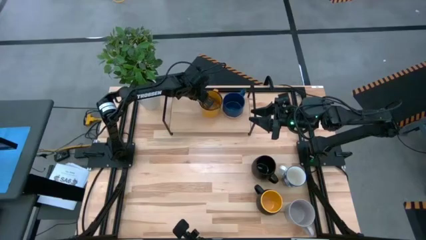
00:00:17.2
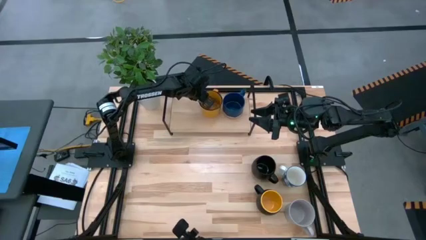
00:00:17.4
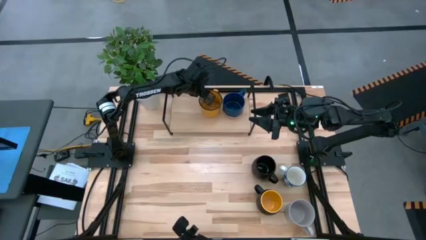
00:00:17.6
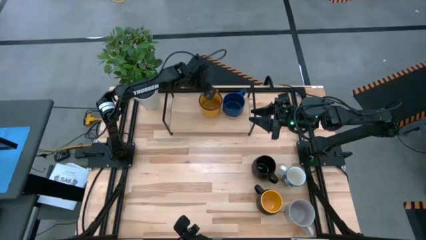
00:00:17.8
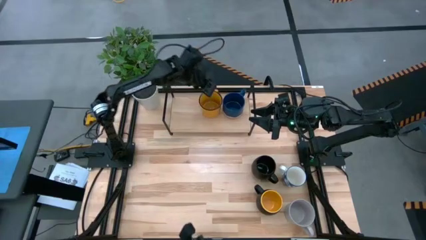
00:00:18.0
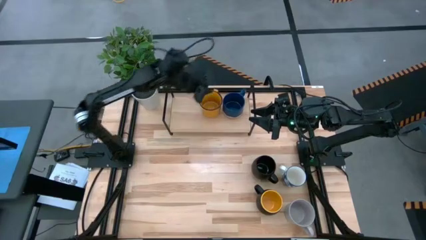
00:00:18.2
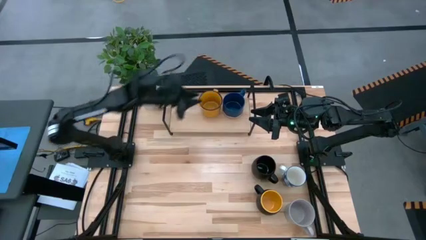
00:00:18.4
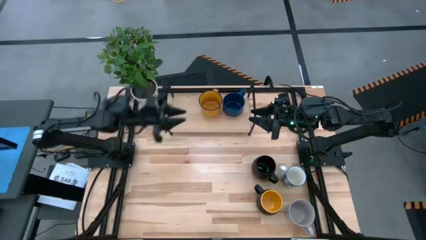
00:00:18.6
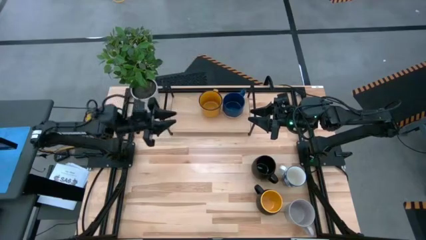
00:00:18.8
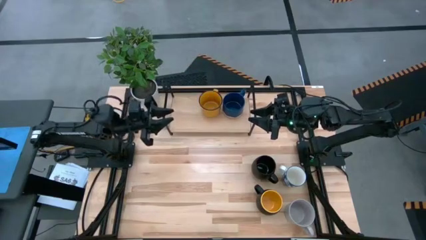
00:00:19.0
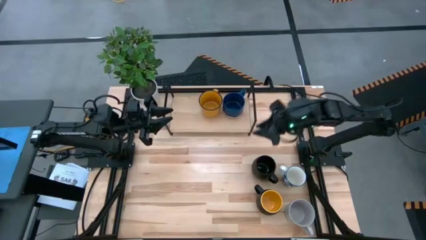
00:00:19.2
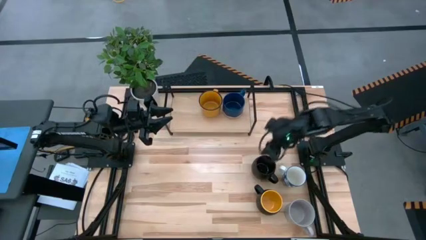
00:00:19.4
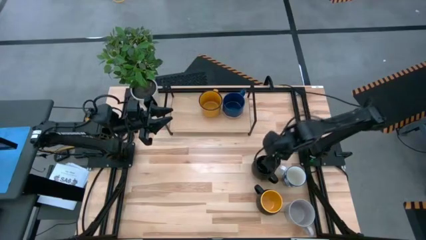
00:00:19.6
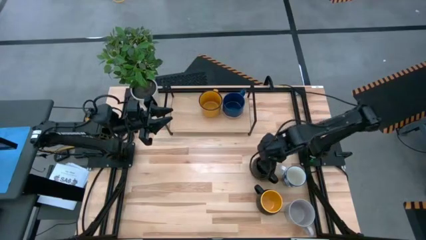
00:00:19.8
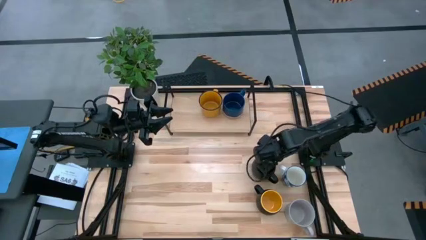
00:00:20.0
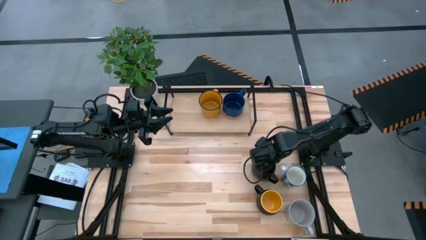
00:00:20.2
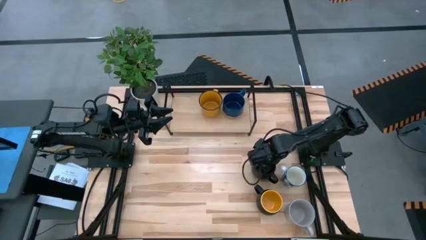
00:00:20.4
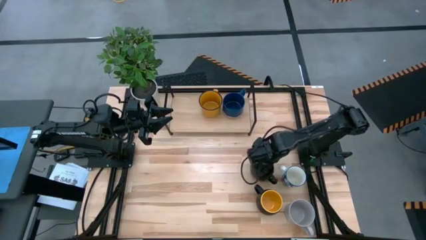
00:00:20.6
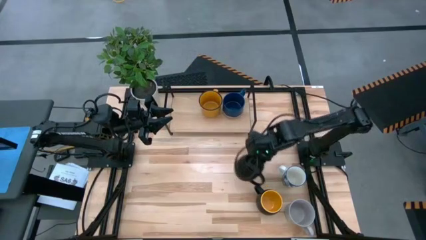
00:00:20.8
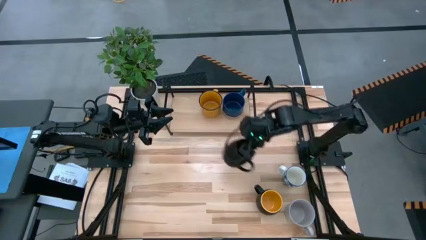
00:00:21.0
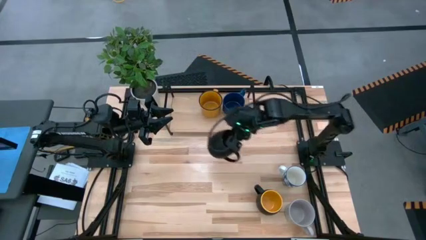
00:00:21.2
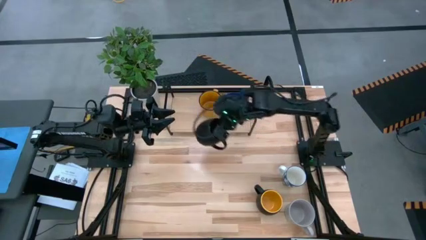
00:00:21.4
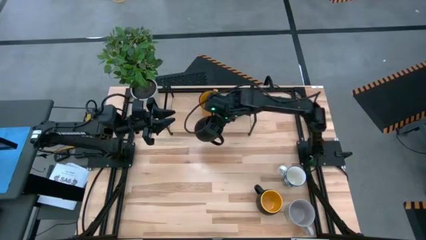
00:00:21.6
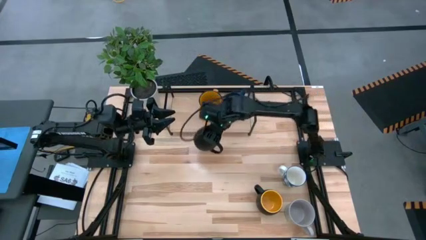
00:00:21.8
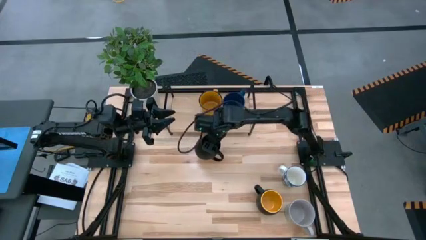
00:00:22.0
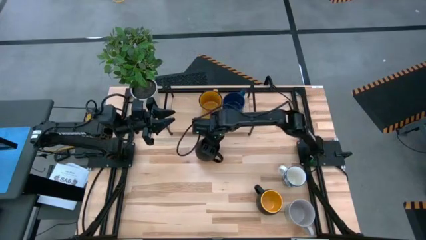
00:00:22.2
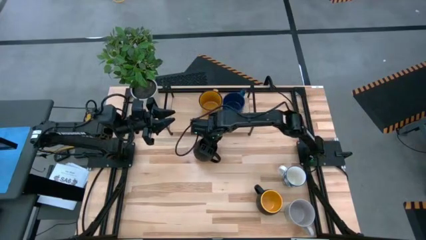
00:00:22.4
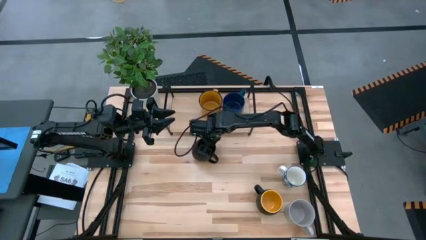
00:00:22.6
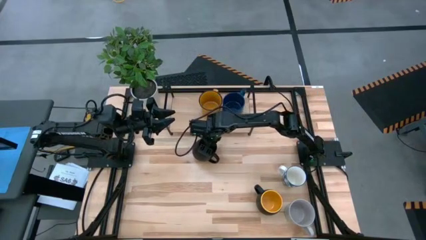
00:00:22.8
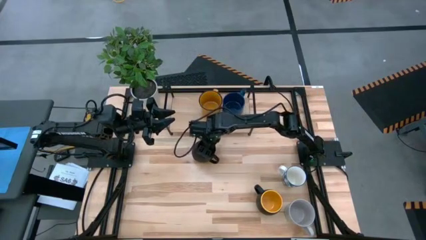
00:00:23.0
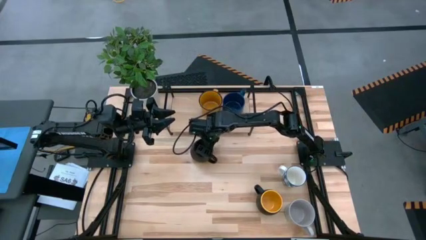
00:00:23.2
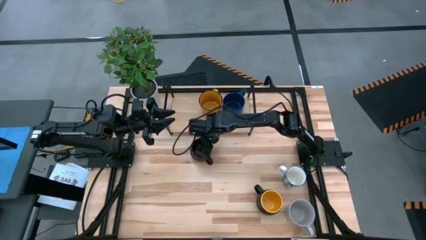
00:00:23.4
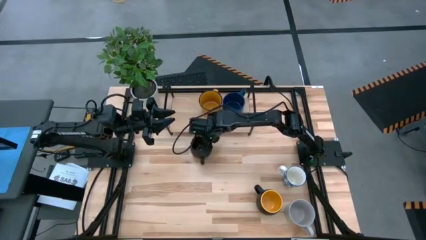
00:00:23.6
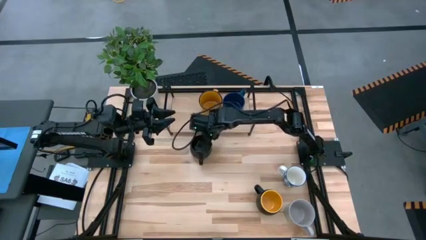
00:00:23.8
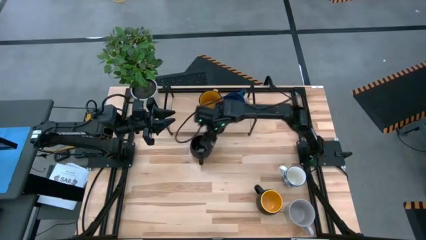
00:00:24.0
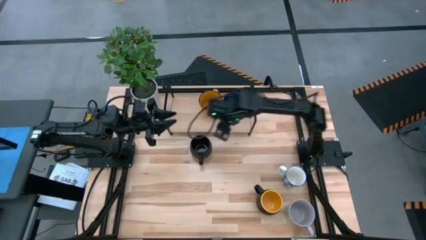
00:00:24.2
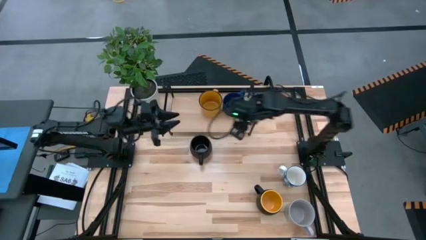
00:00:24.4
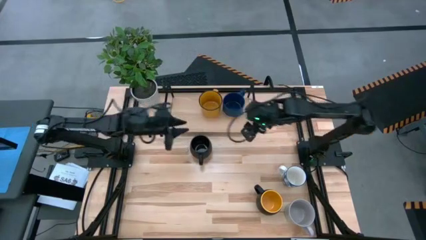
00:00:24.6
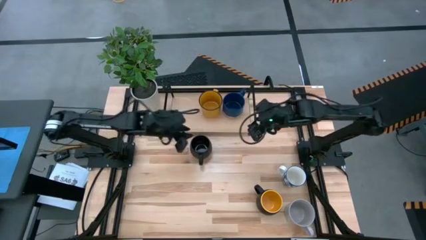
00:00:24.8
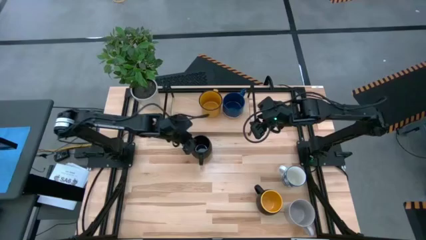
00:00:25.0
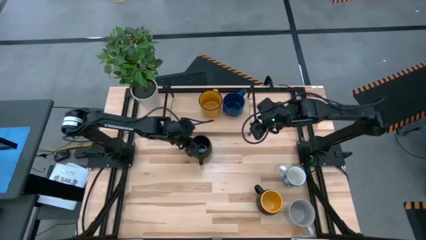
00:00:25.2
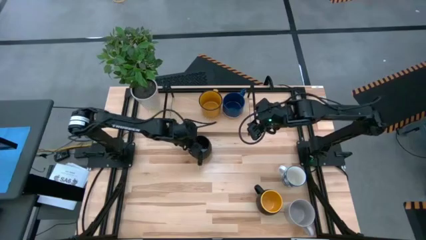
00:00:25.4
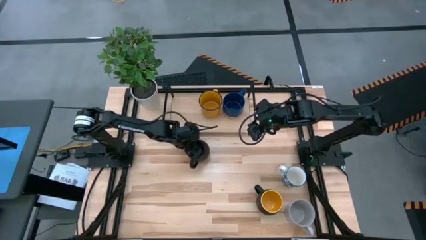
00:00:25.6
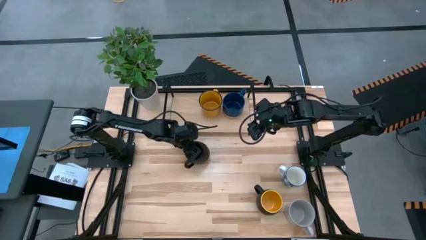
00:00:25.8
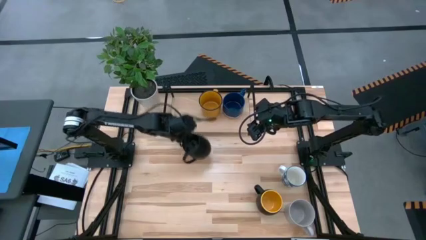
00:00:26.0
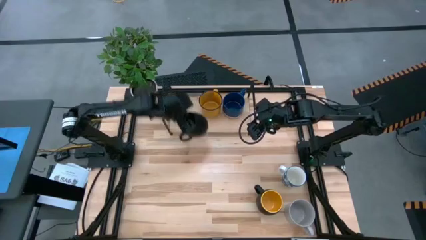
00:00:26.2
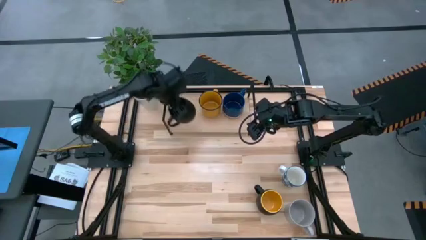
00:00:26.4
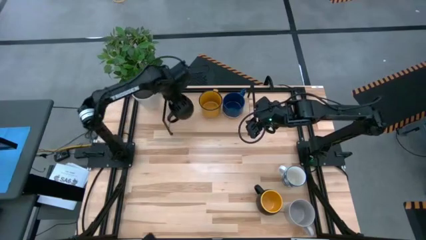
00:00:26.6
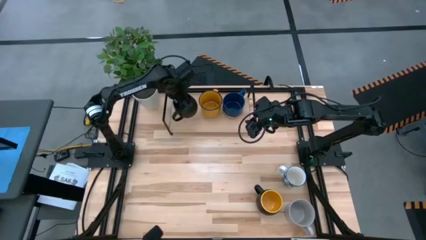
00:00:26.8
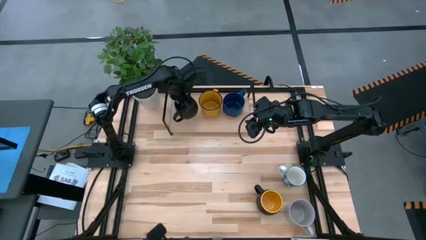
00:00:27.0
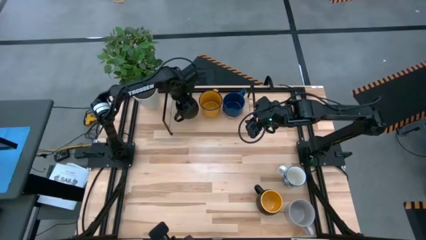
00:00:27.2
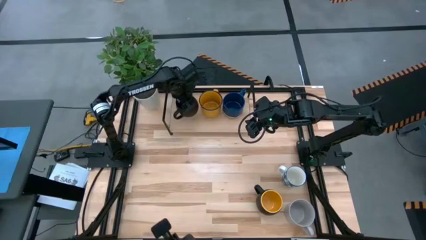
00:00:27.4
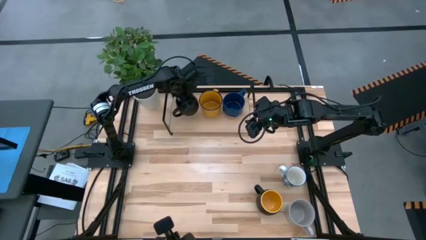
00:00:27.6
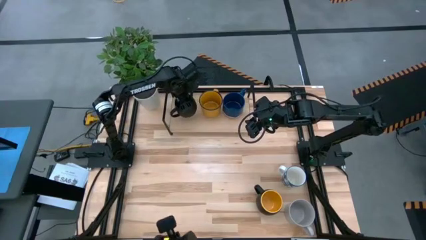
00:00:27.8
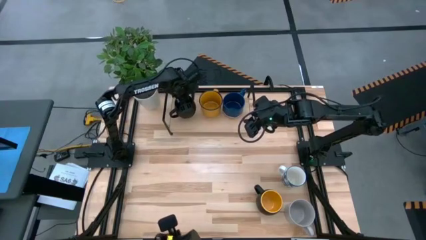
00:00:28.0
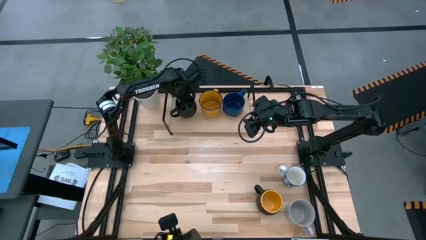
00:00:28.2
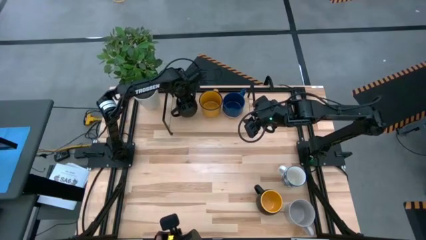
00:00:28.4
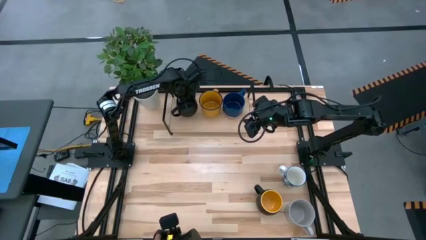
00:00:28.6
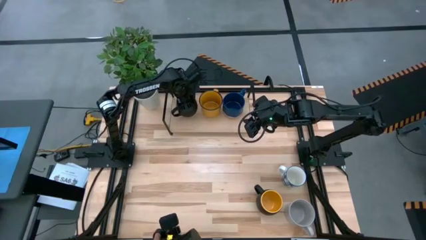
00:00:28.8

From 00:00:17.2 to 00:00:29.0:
Task: Place coffee mugs
Put the black mug on the shelf
